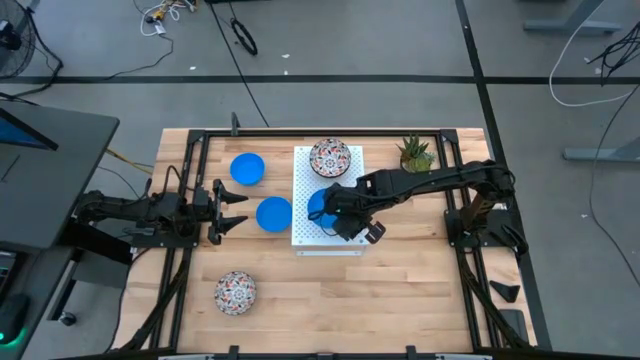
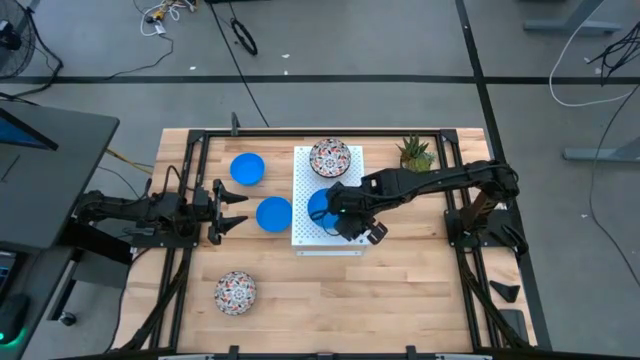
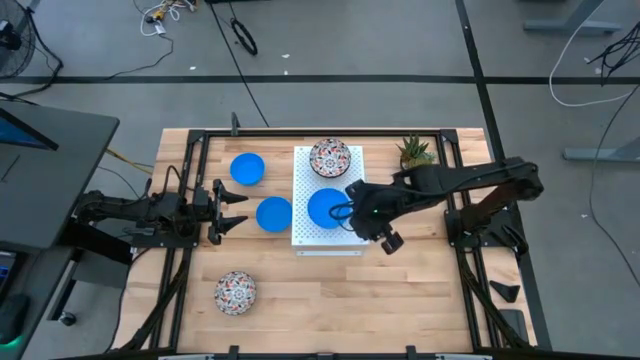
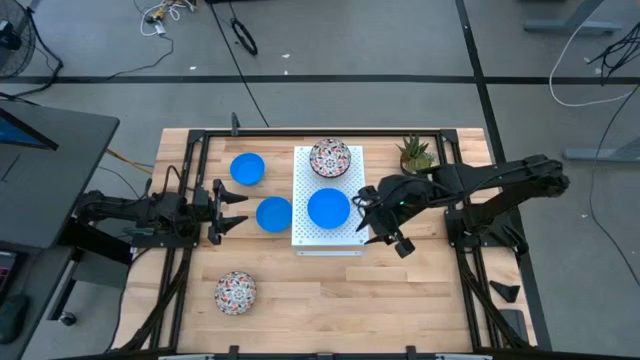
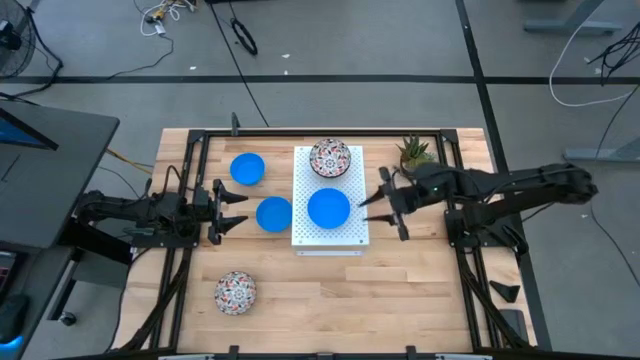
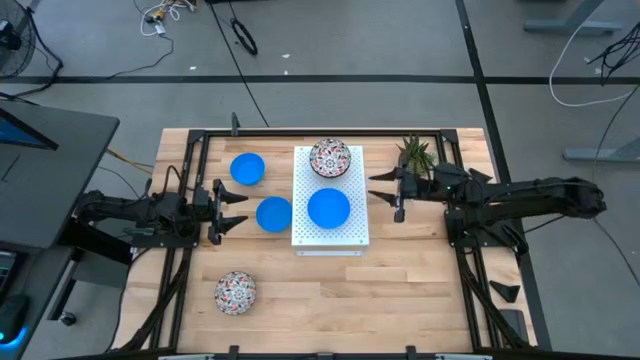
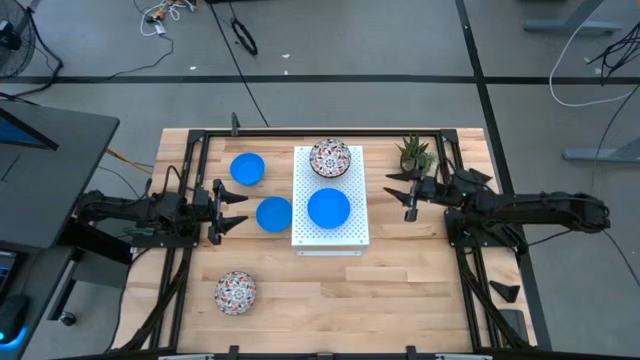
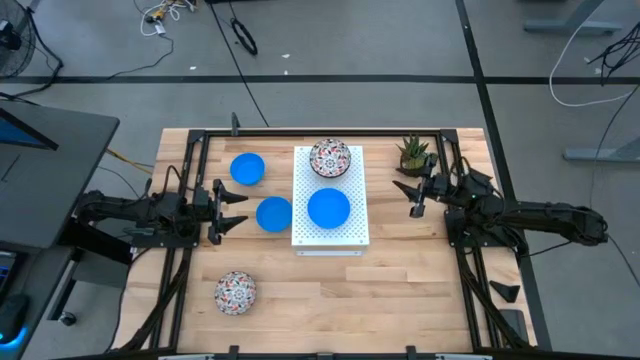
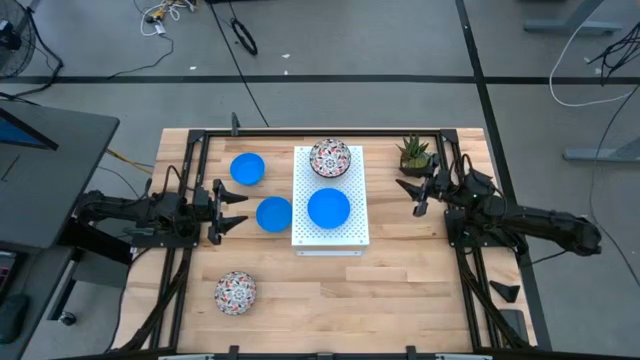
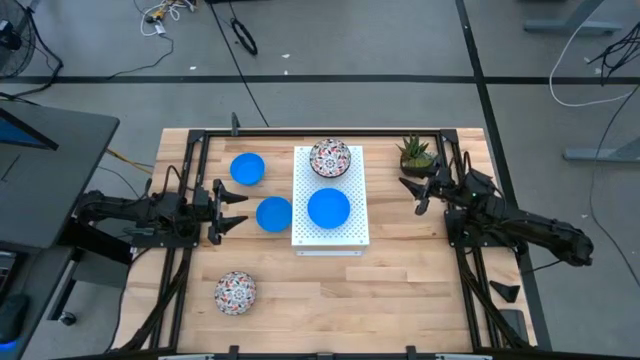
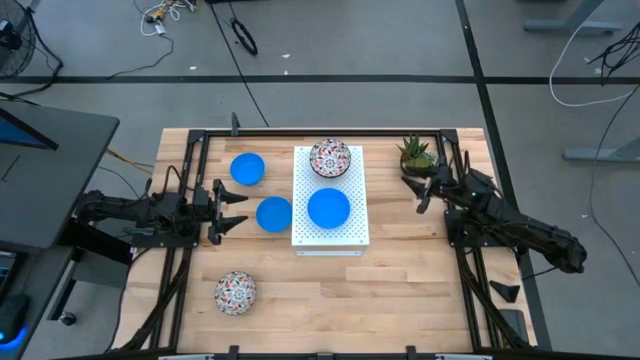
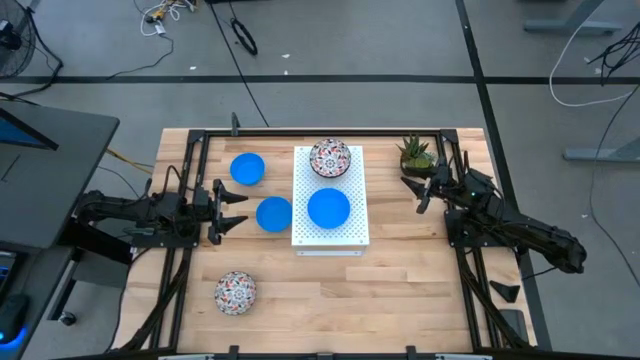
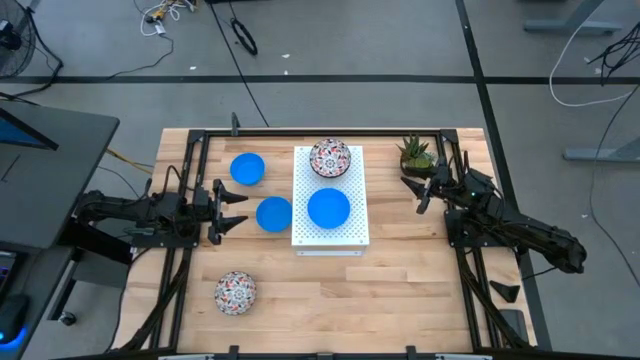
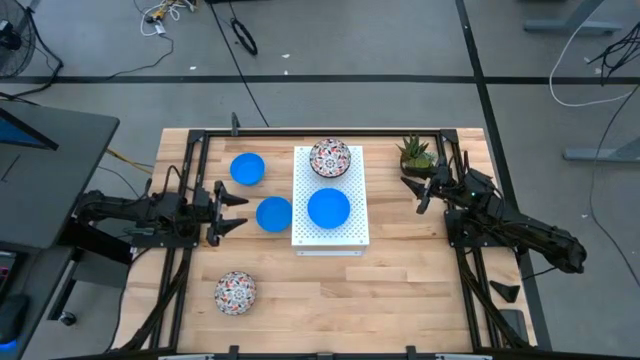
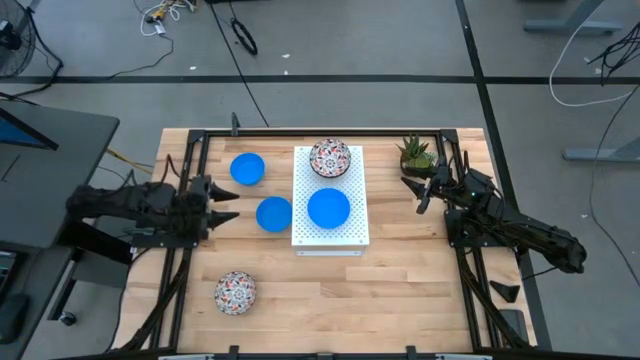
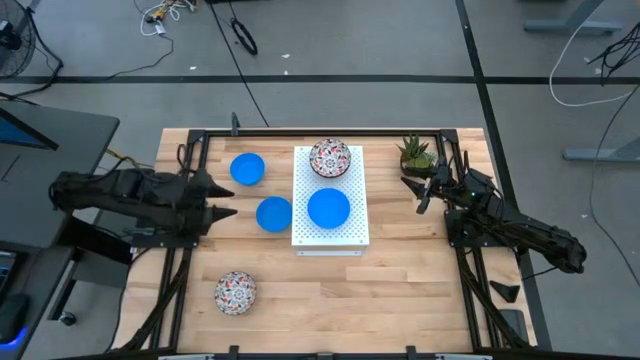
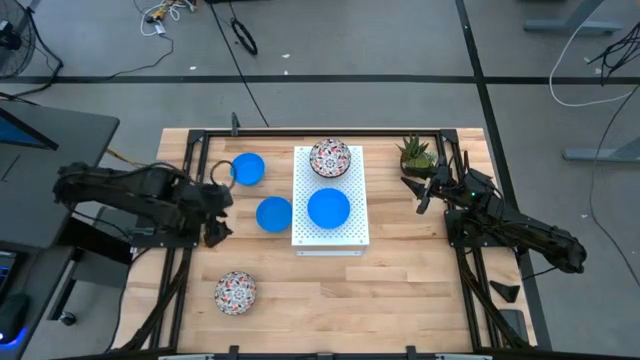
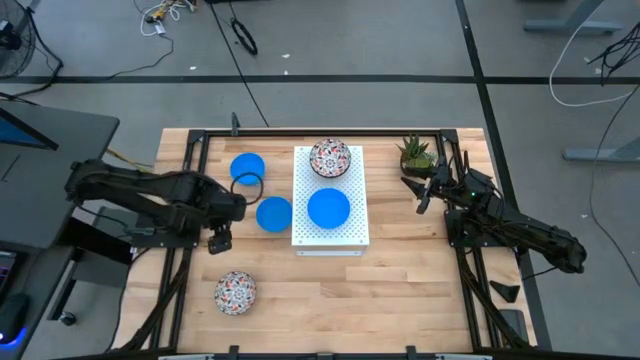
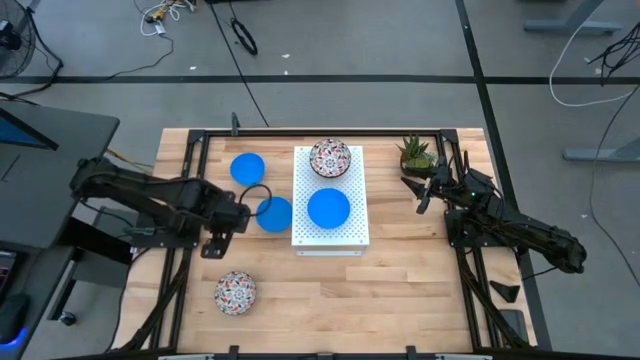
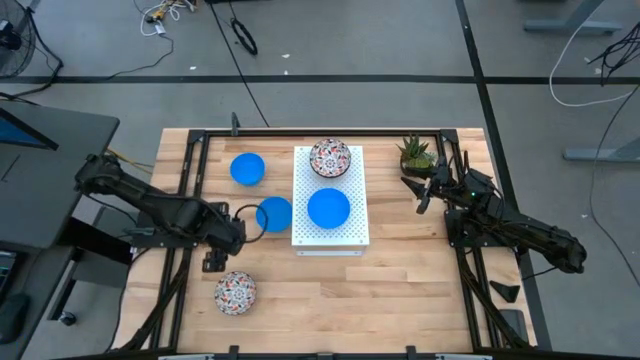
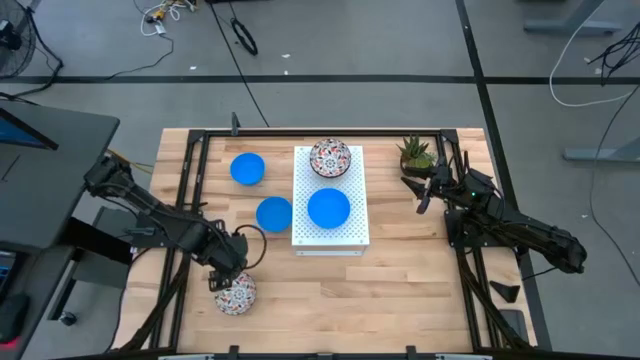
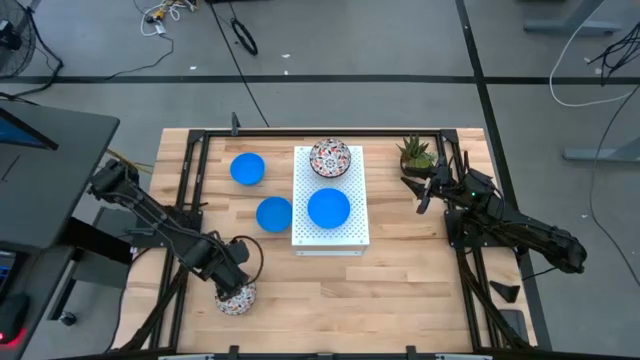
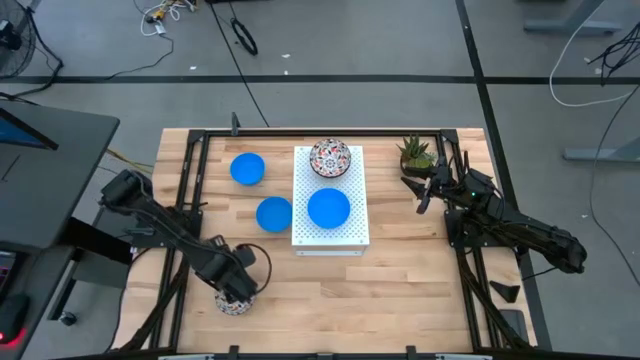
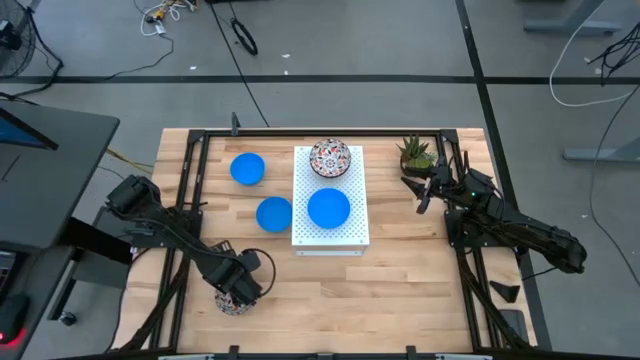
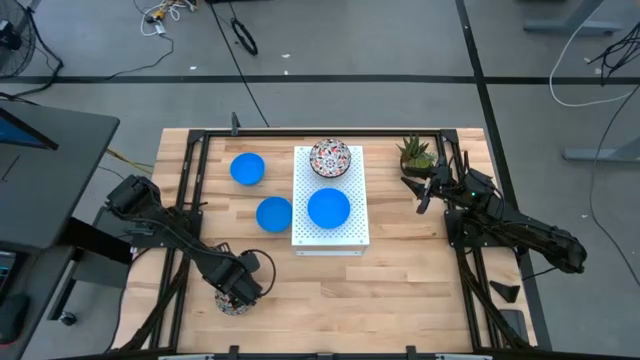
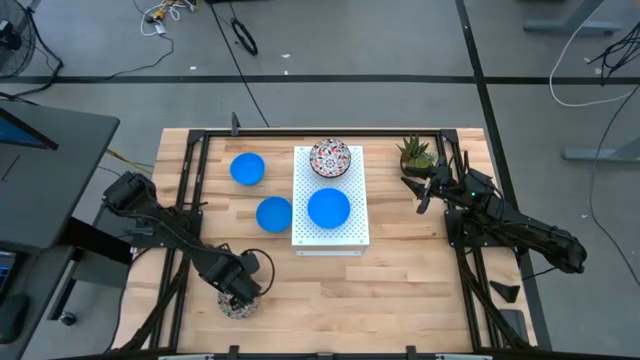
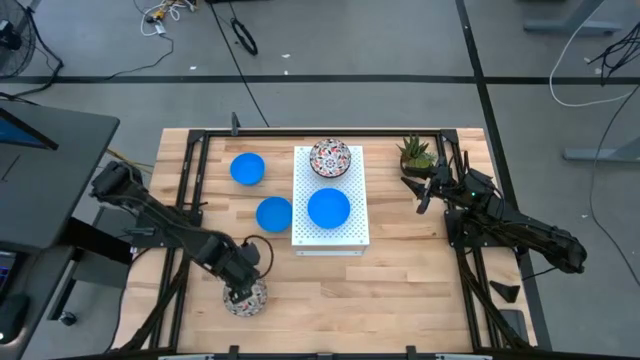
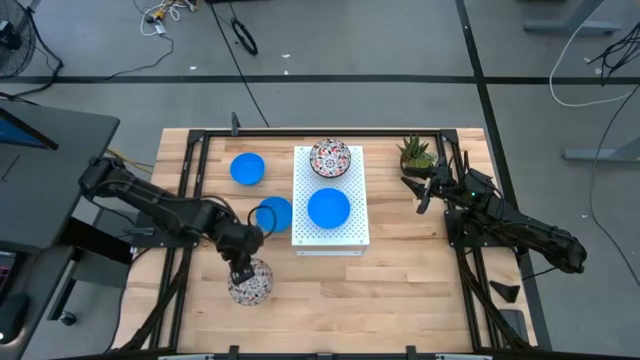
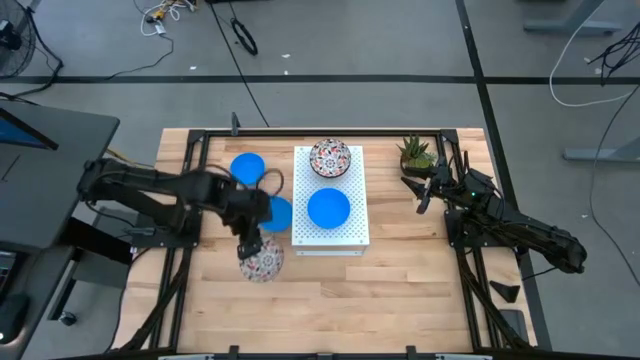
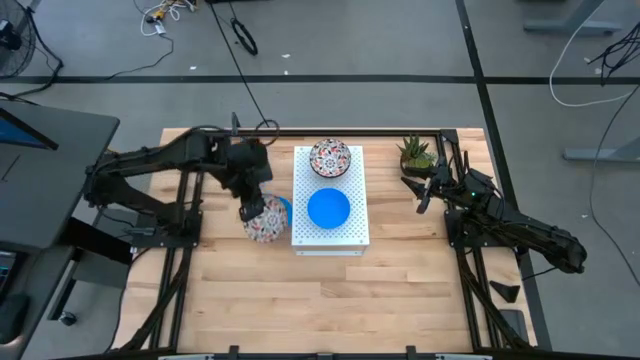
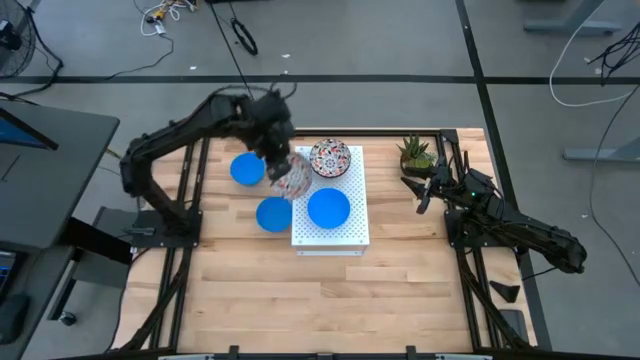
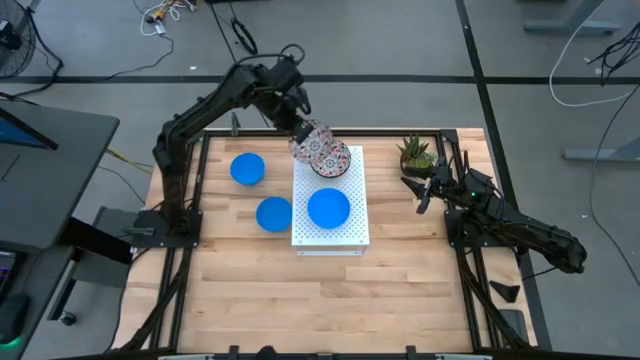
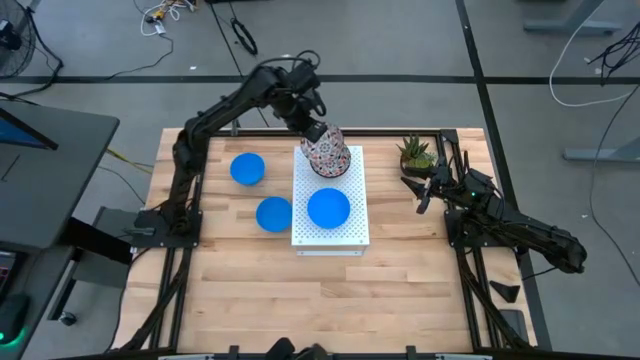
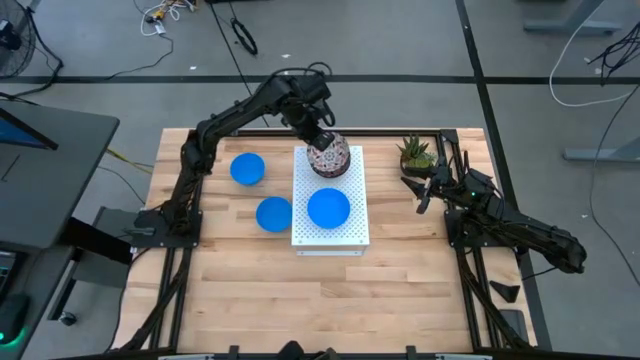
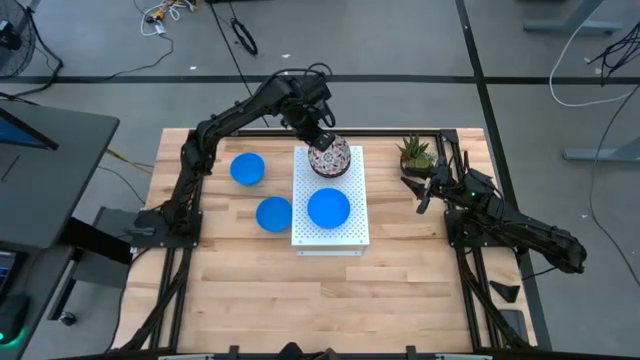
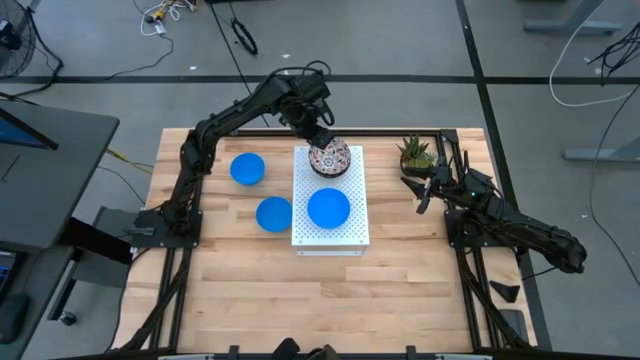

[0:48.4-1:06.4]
Task: Pick & Place Mini bowls
Stack the white bowl on top of the other white bowl on the shelf

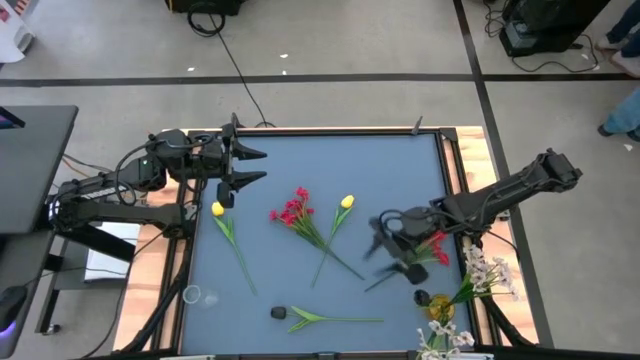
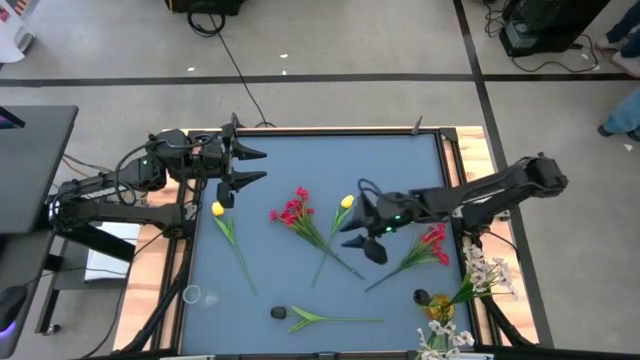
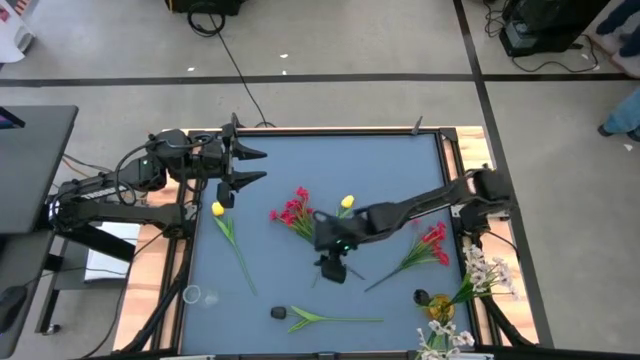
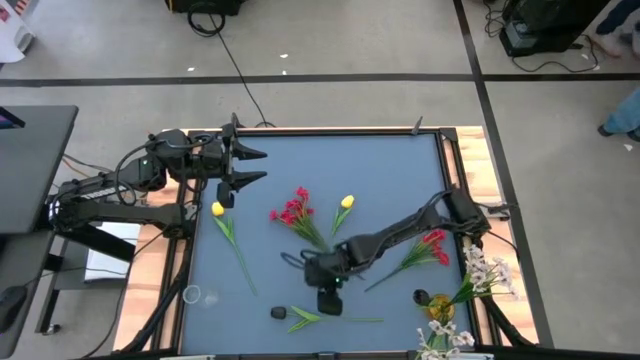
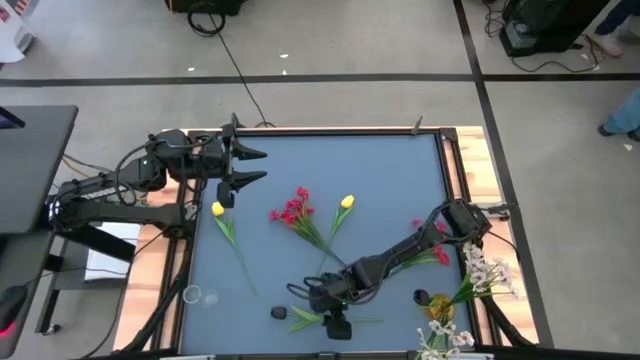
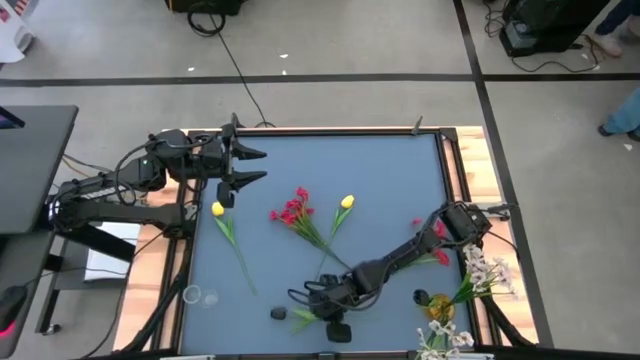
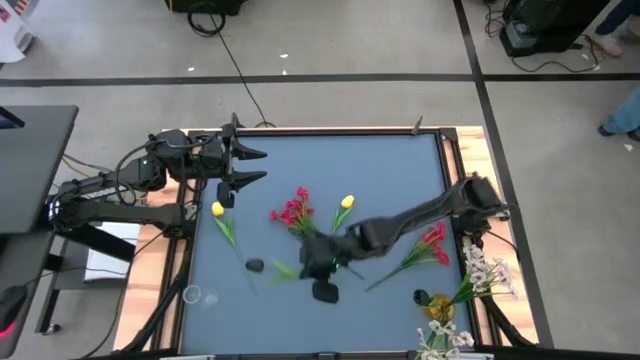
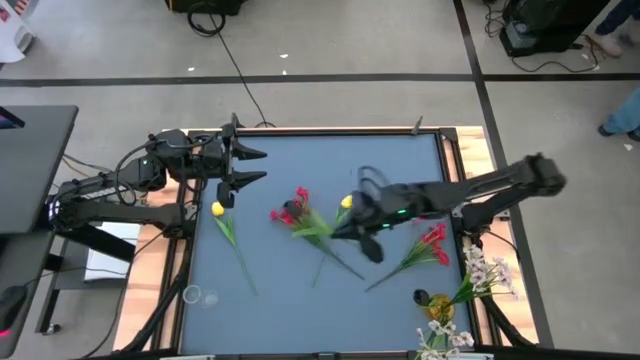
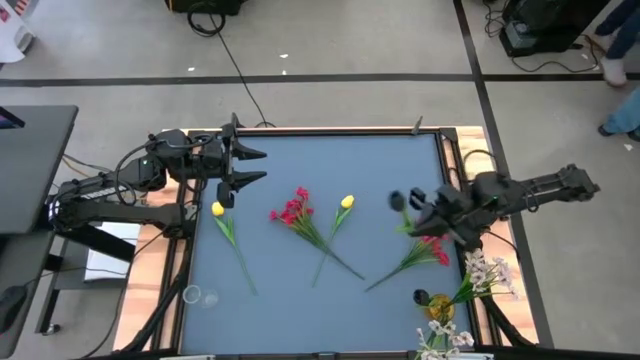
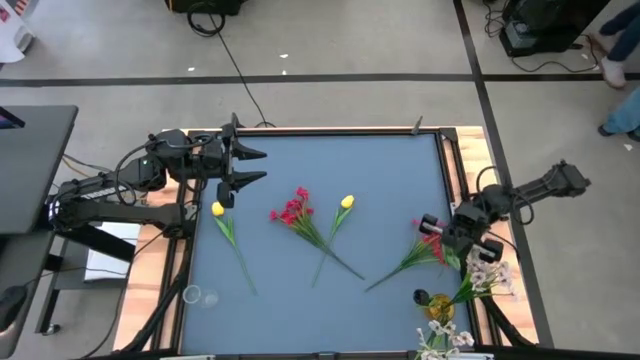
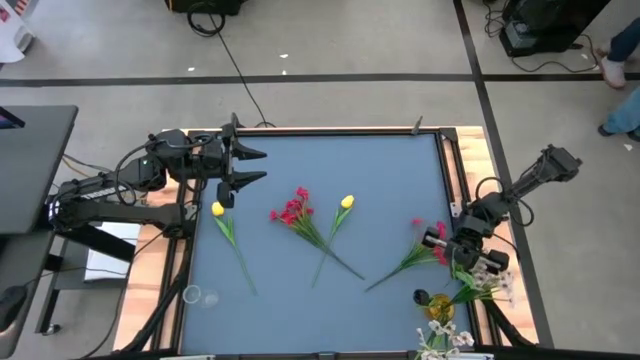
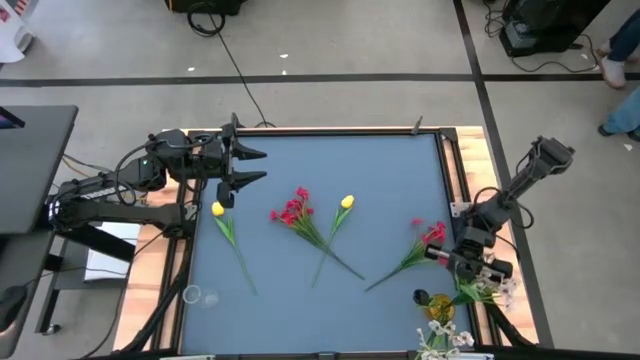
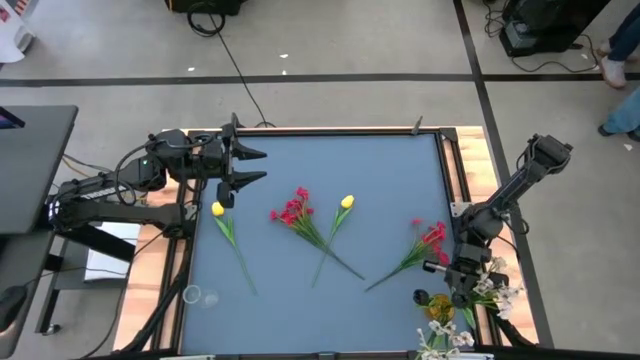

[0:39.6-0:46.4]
Task: Sort flowers into vase by color
Put the black flower into the yellow flower vase
